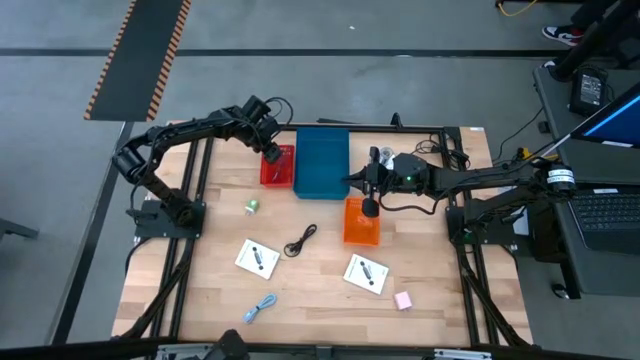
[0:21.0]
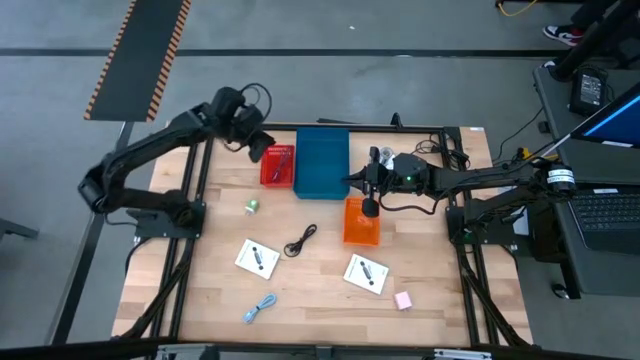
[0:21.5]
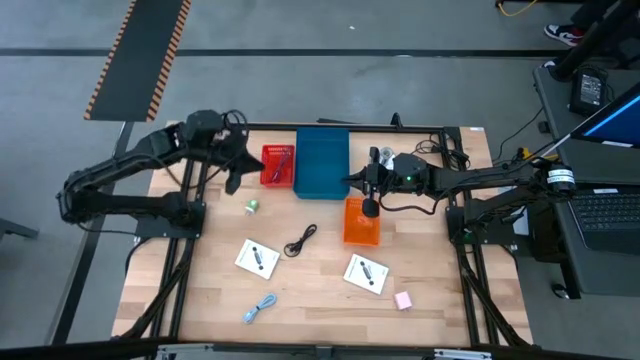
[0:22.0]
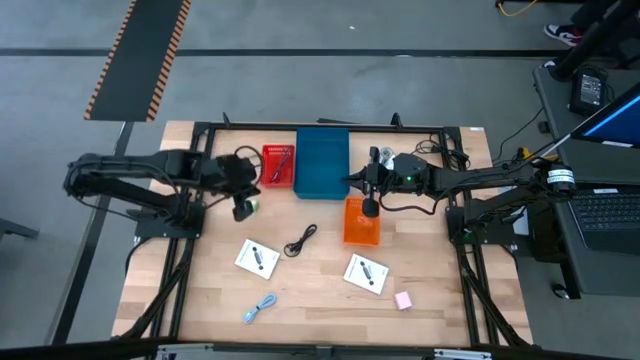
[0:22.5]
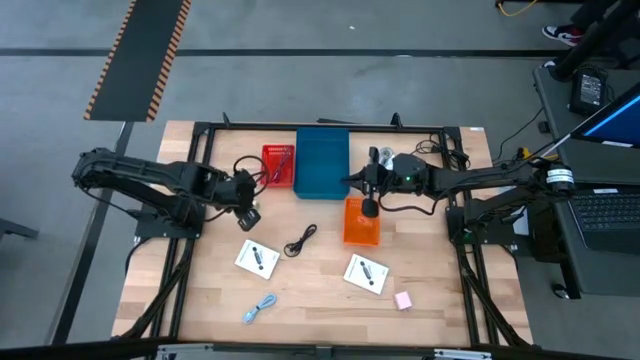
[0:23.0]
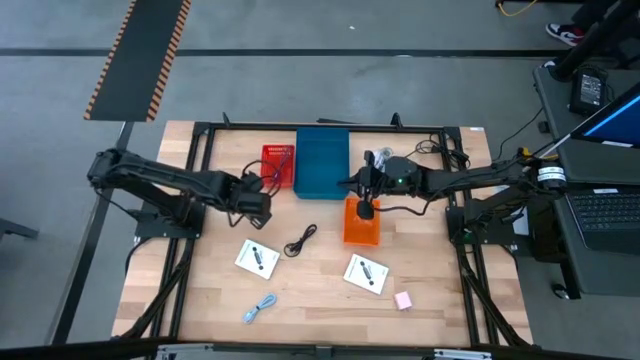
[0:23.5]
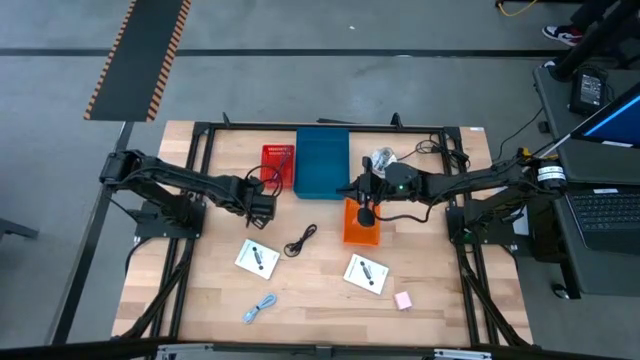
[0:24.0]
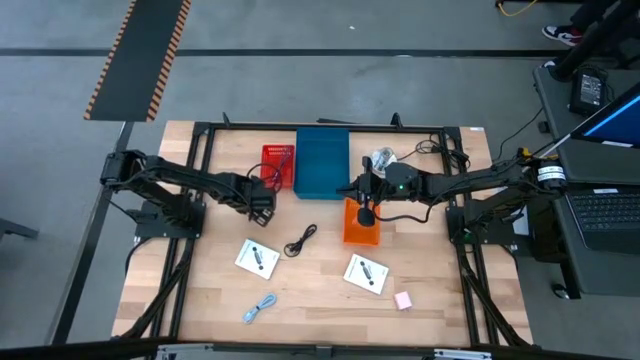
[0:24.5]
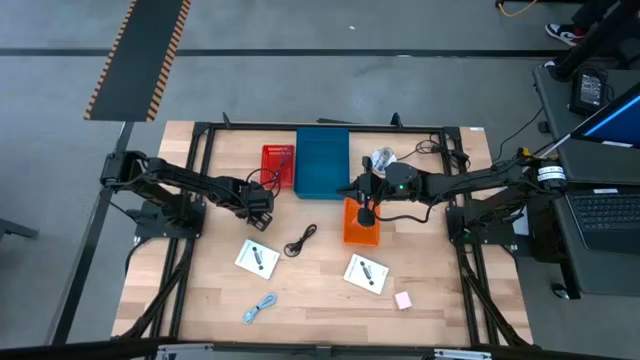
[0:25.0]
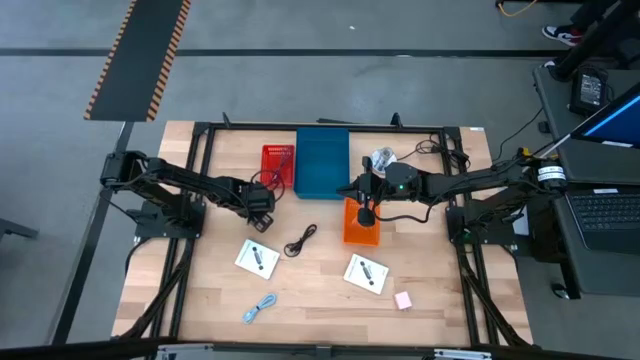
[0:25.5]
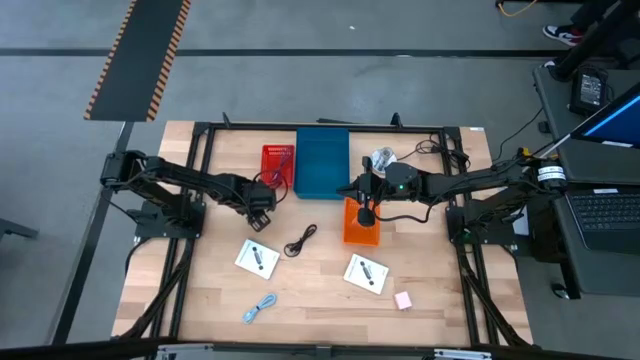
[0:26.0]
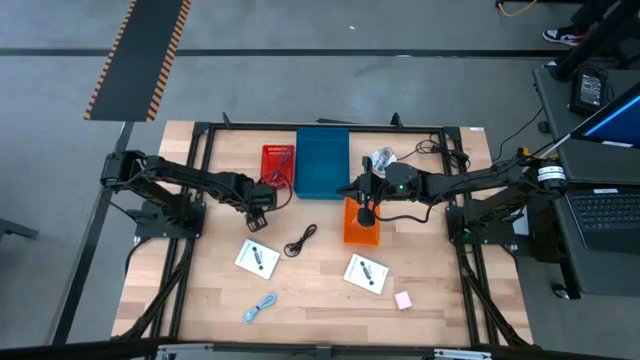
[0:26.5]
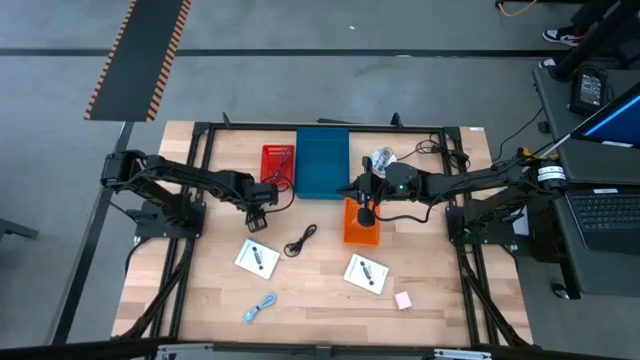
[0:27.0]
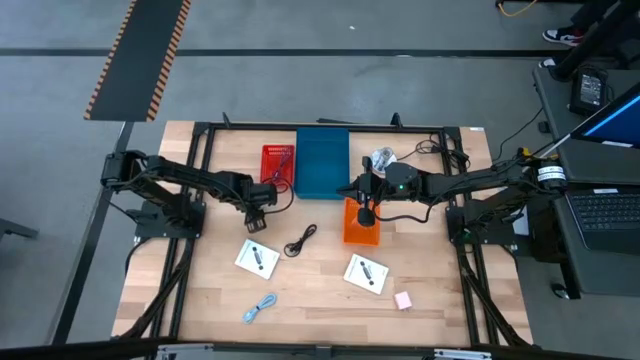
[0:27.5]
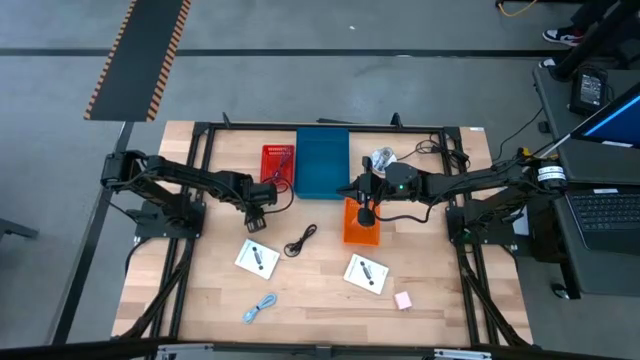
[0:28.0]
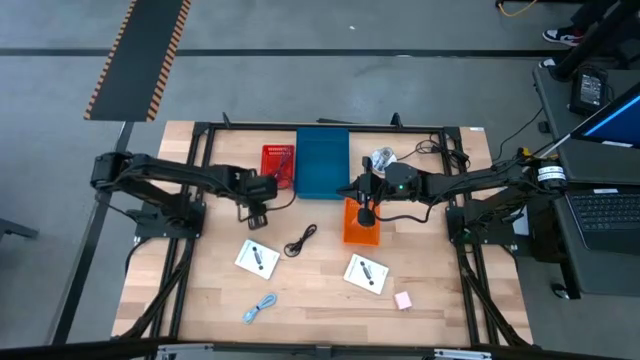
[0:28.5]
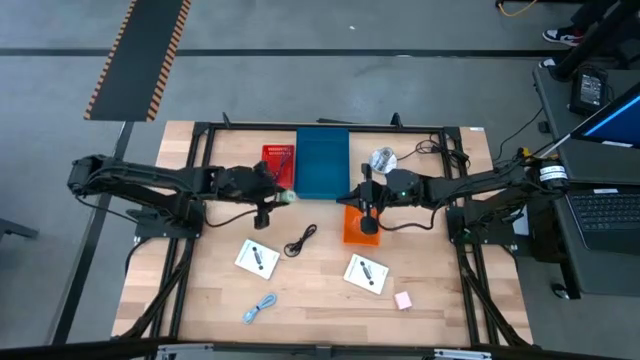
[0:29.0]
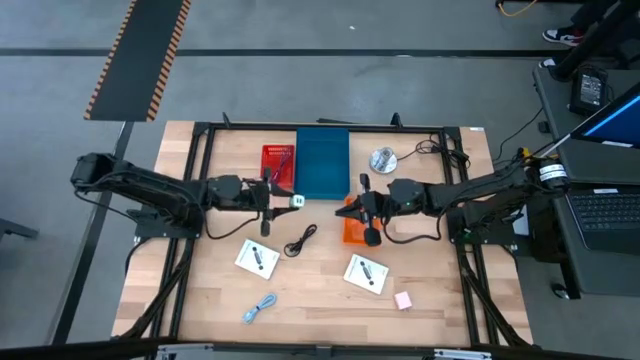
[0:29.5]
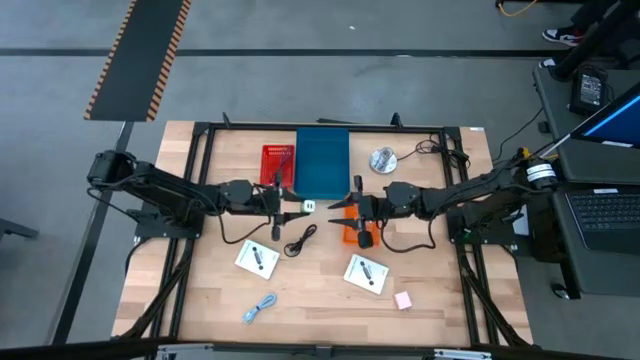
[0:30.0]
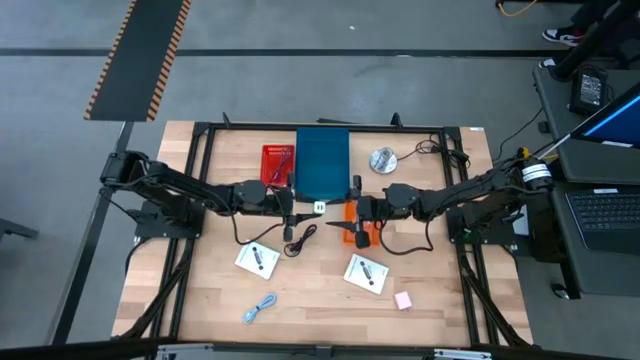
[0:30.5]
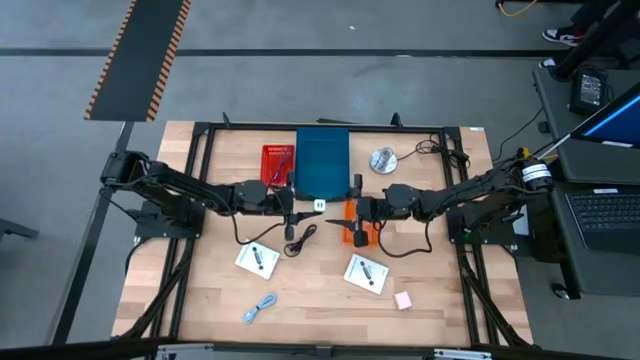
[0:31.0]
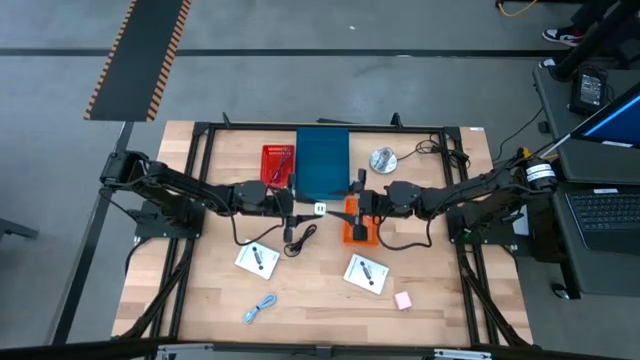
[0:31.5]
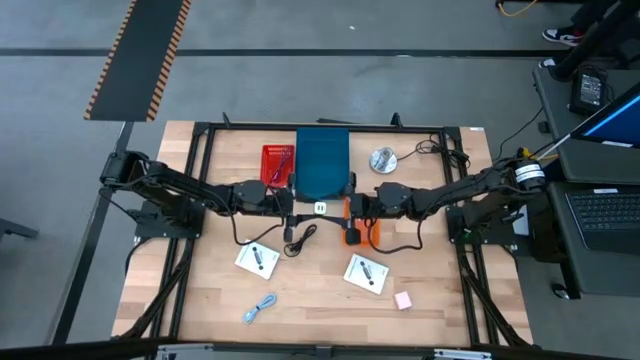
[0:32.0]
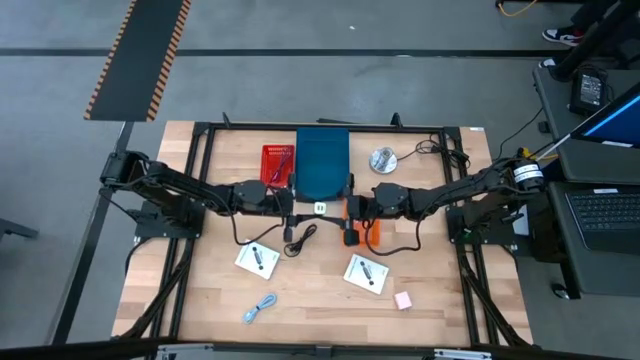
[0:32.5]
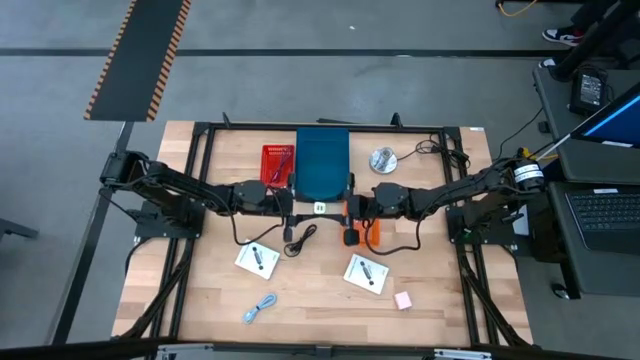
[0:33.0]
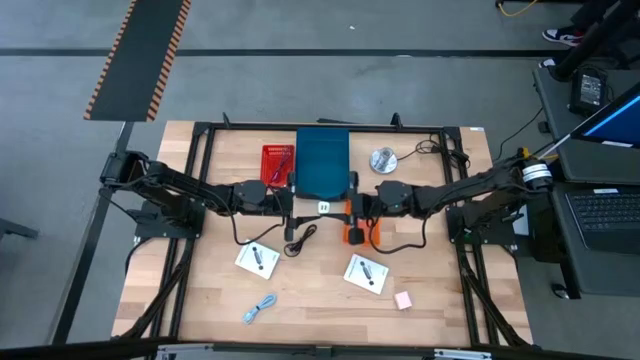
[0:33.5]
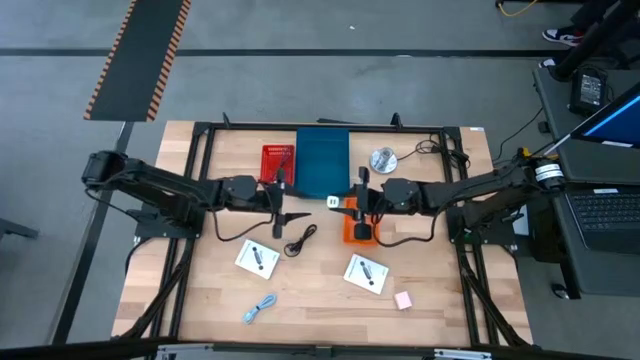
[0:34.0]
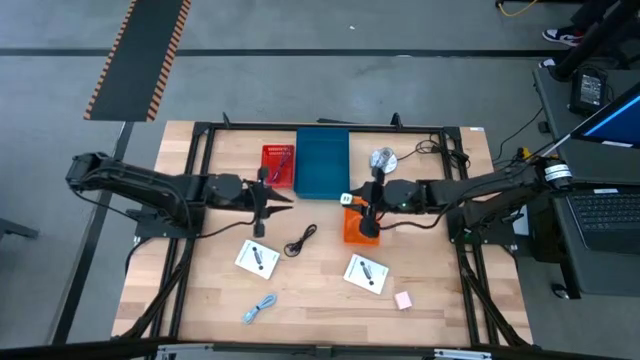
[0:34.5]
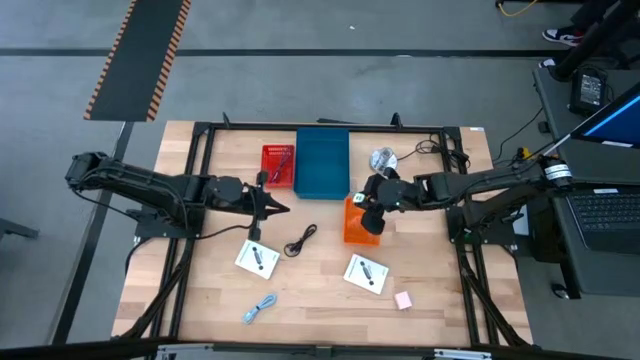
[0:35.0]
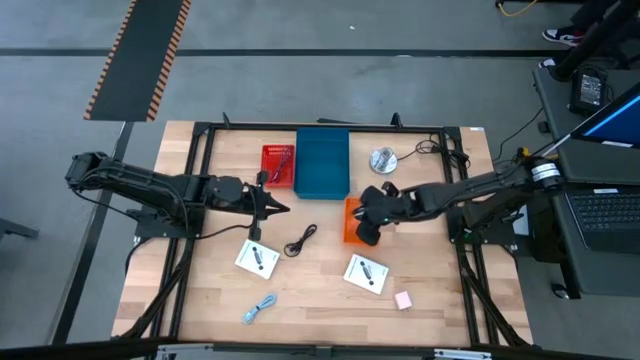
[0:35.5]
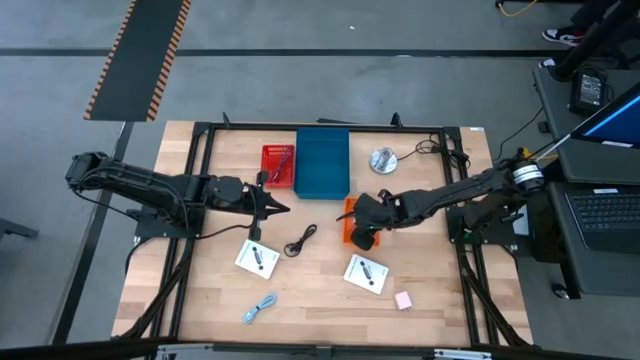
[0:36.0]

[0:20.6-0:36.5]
Task: Pick and place items into bin
Put the green charger adapter into the orange bin
